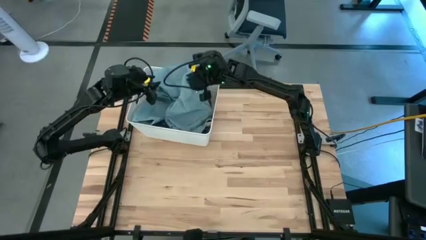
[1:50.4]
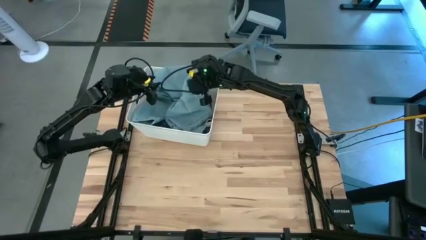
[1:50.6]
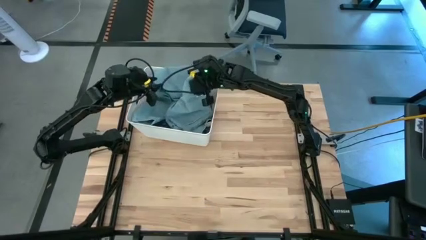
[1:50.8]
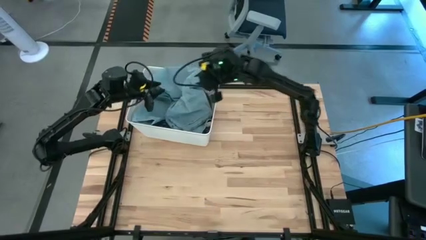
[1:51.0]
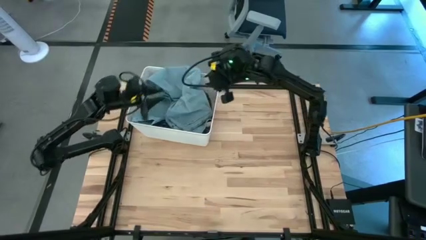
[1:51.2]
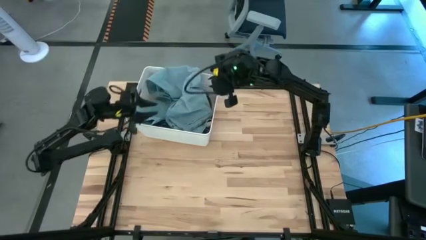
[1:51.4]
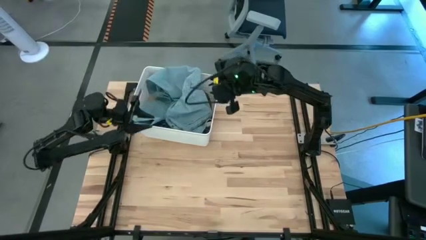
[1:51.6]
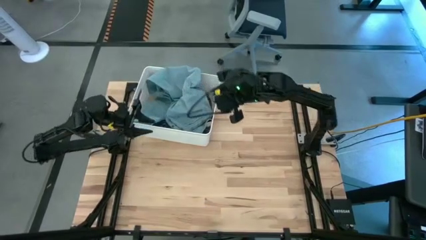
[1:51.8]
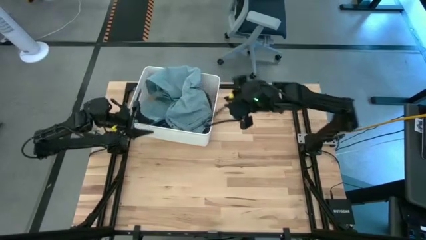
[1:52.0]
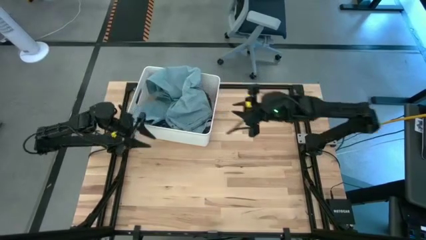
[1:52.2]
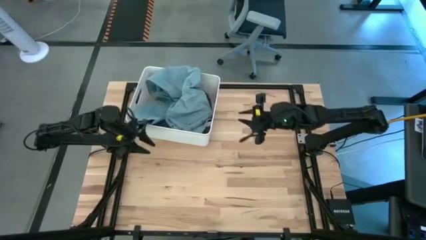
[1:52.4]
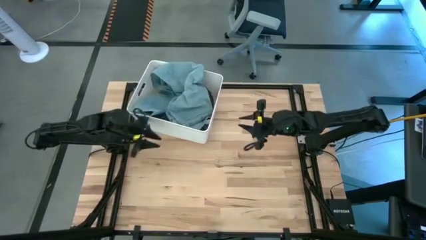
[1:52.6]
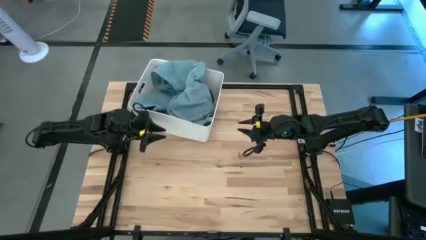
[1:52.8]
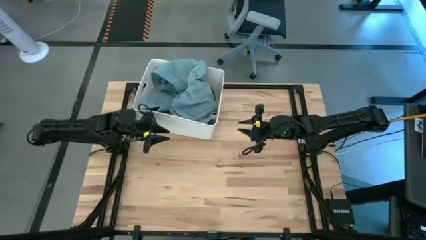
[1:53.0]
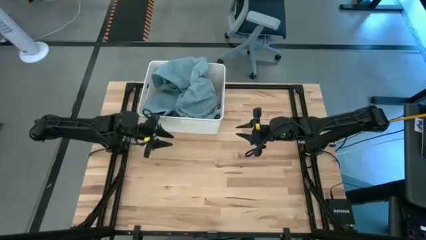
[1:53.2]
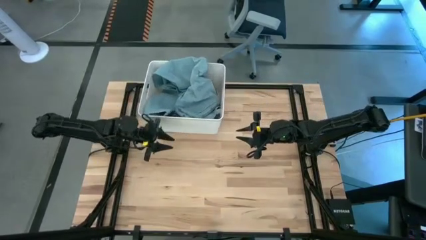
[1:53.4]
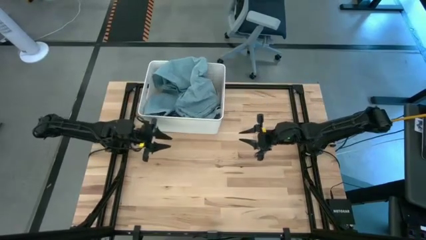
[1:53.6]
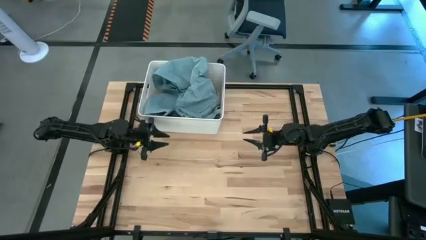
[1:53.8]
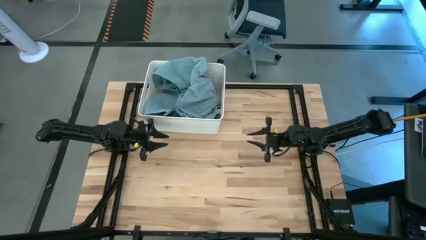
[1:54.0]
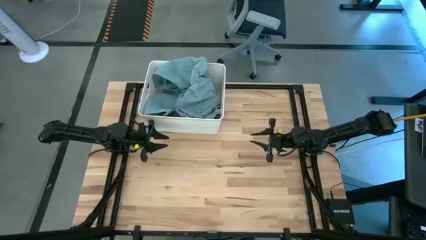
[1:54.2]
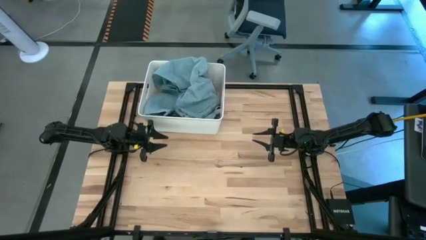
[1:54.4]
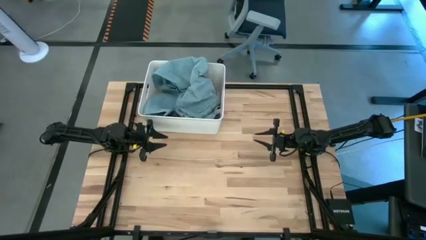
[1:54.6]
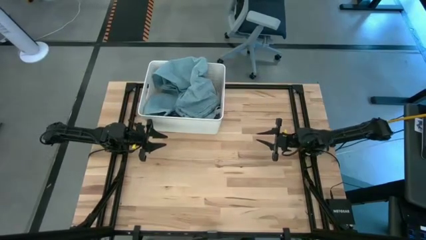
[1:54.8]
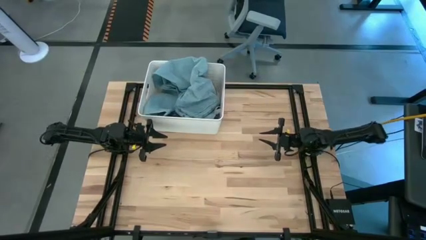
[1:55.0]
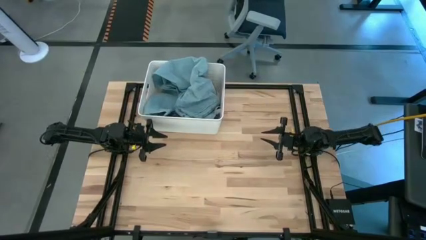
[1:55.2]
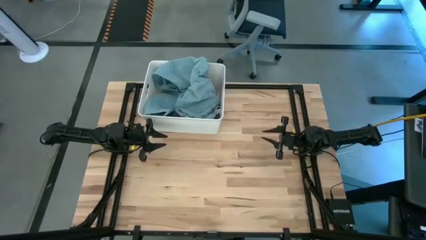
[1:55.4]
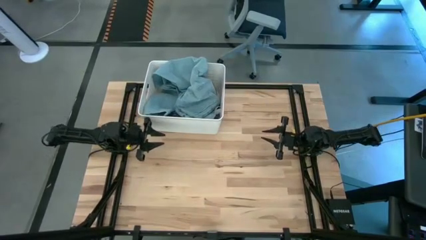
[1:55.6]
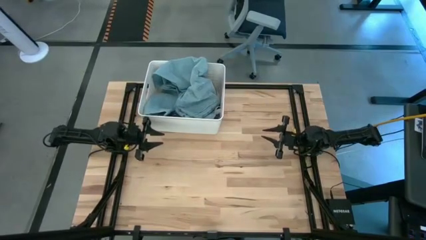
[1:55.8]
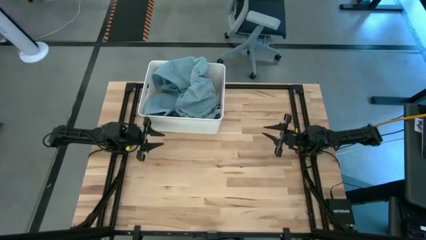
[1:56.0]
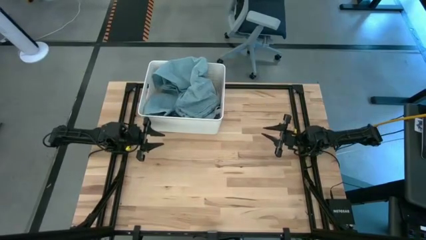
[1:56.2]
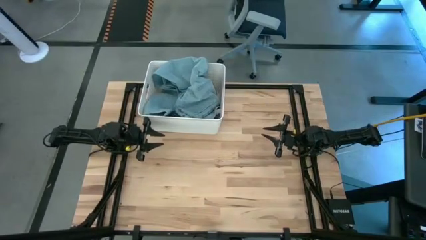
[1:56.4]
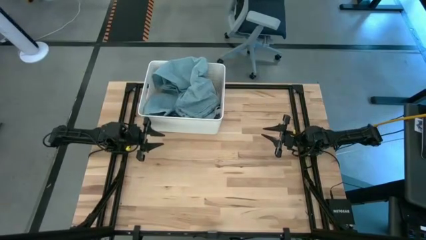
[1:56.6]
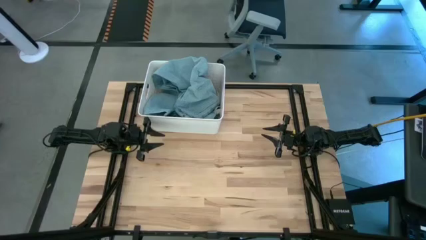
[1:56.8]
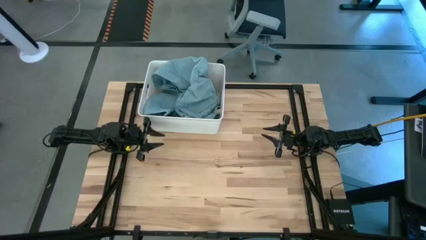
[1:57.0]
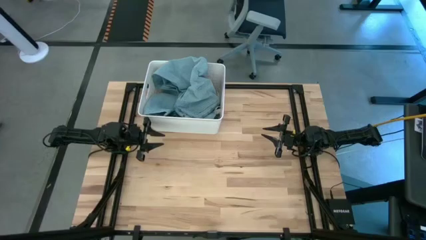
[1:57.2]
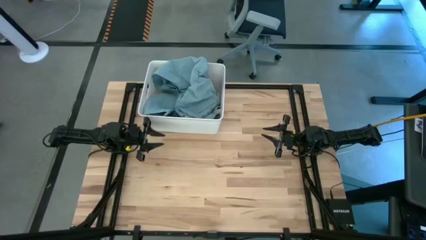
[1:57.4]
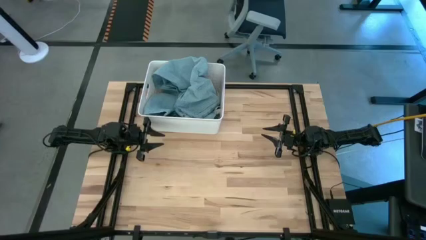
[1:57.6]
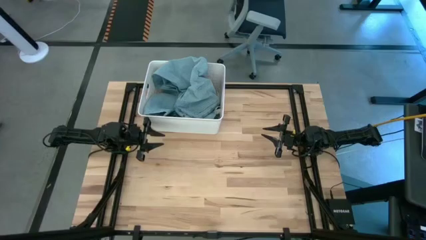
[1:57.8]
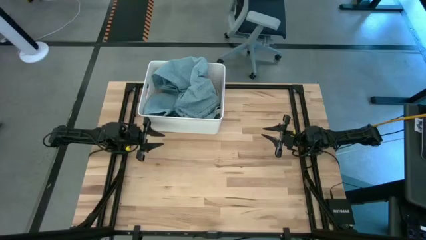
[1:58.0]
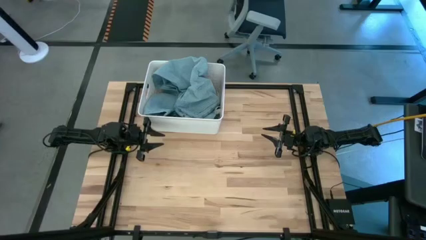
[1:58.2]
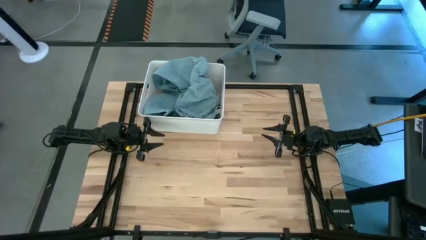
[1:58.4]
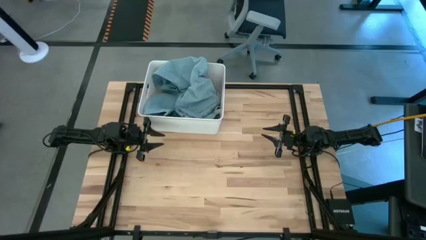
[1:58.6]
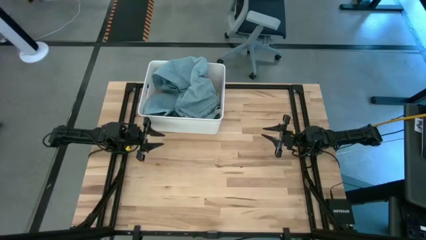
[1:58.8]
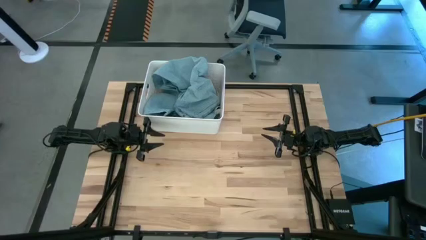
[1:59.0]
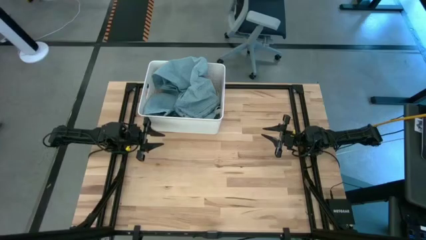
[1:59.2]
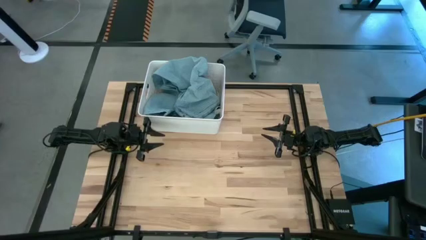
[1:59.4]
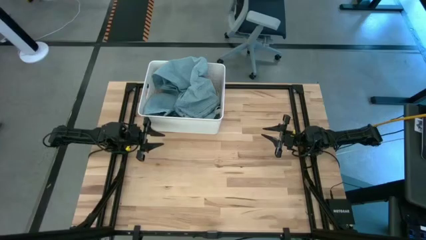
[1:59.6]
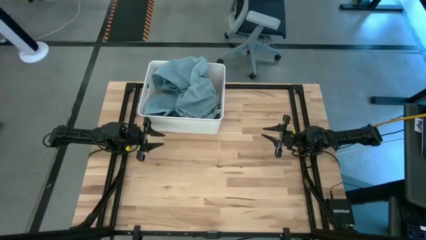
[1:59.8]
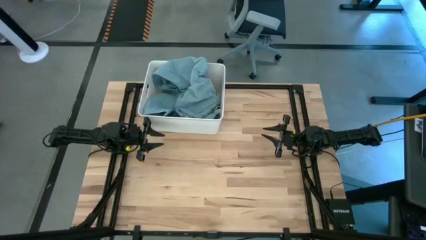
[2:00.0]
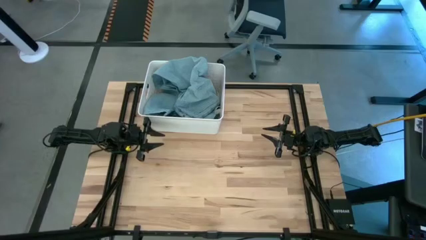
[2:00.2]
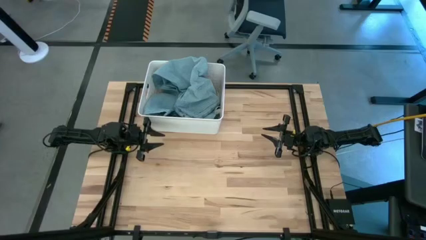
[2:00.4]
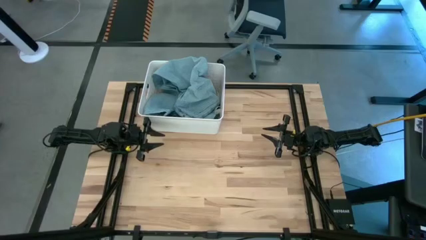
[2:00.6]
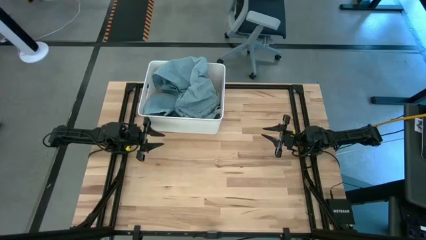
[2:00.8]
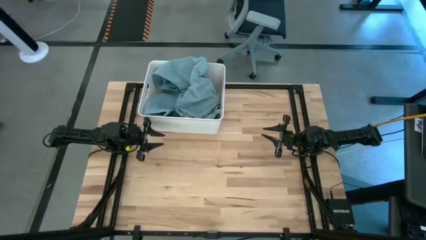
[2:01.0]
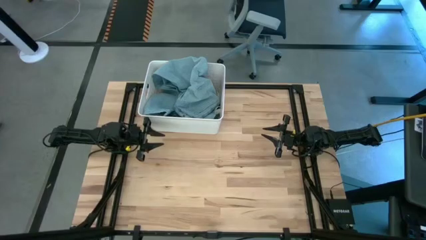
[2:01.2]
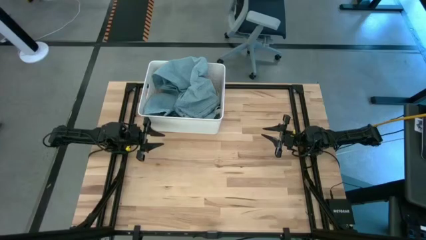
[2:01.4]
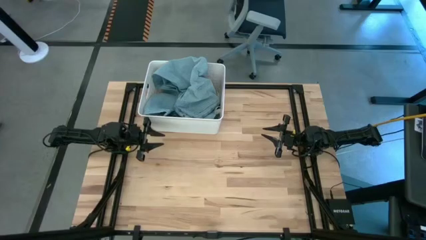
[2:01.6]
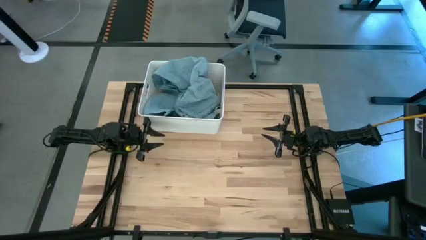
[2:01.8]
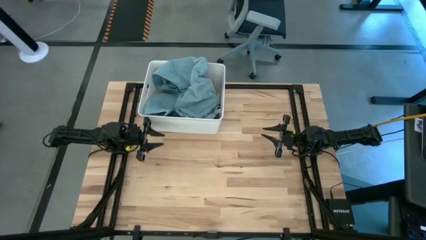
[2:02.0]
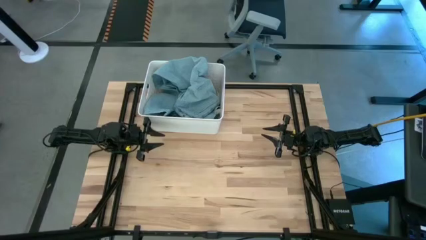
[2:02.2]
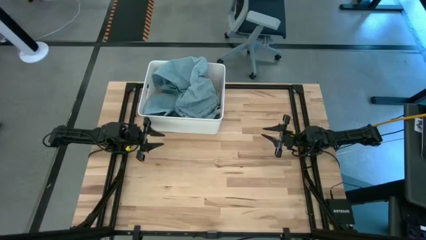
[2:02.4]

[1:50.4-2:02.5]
Task: Sort clothes
Return to Home Position

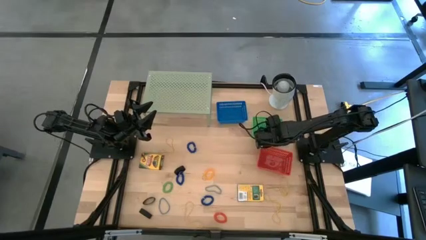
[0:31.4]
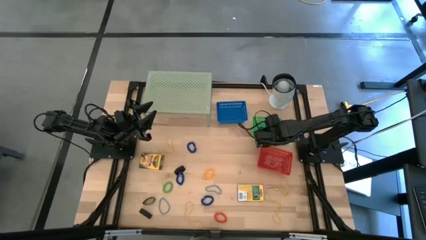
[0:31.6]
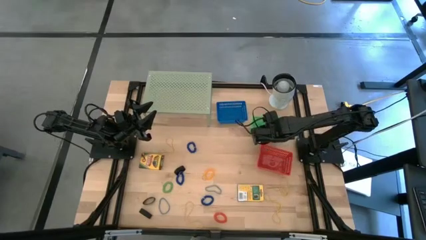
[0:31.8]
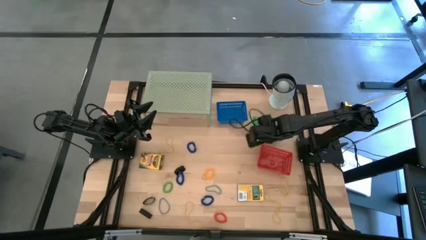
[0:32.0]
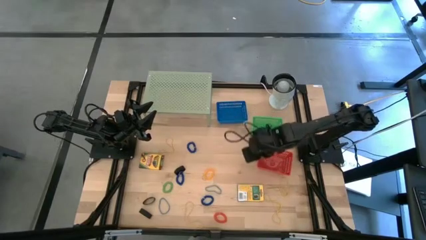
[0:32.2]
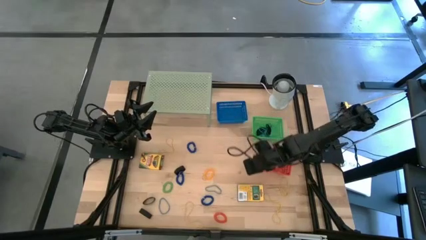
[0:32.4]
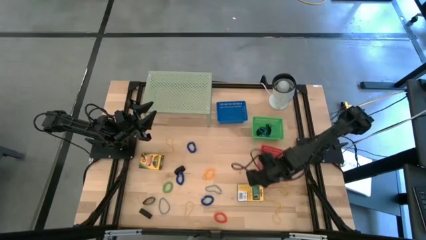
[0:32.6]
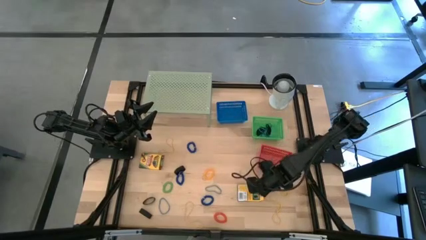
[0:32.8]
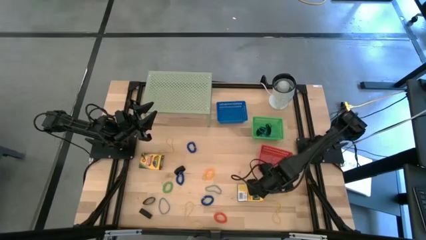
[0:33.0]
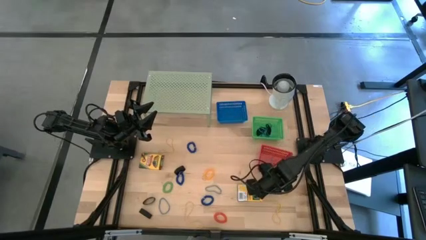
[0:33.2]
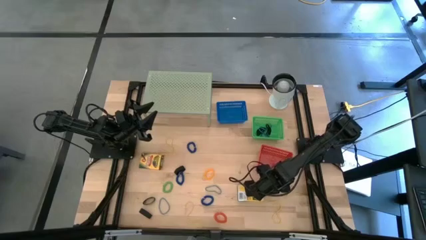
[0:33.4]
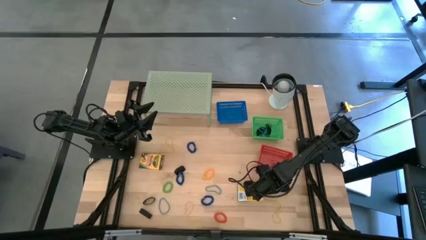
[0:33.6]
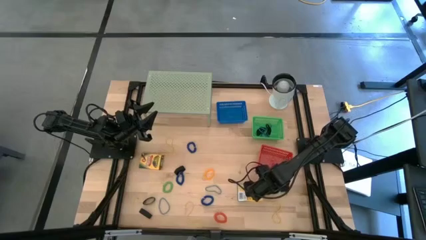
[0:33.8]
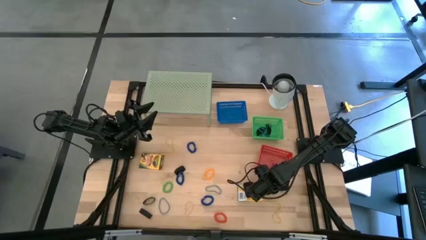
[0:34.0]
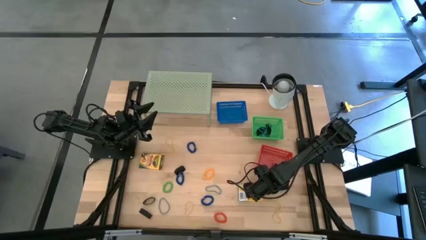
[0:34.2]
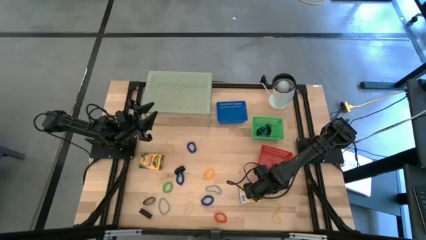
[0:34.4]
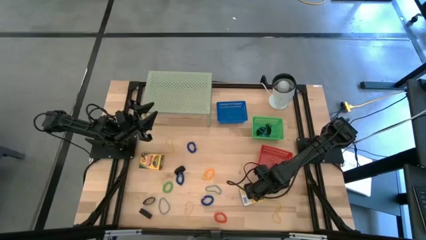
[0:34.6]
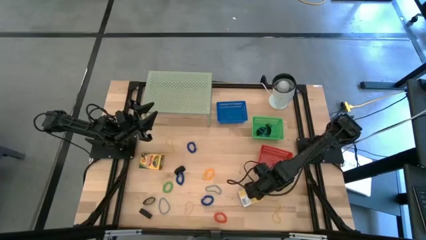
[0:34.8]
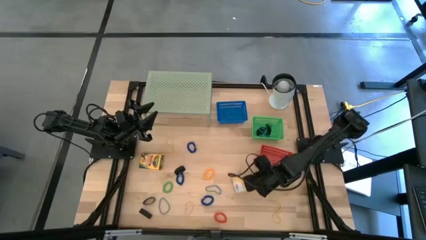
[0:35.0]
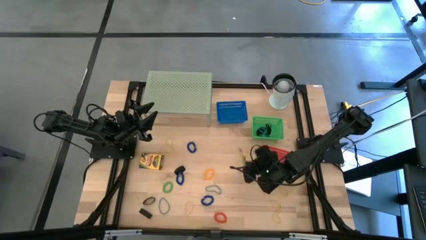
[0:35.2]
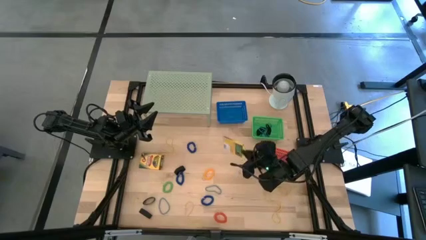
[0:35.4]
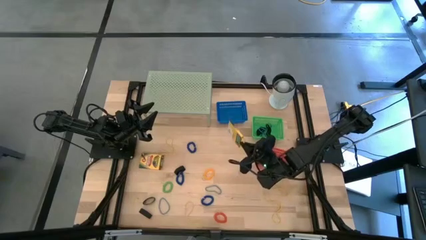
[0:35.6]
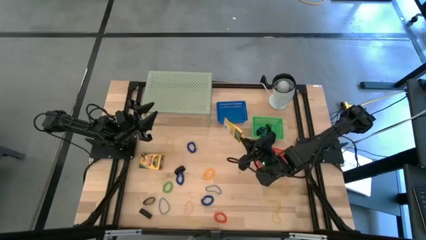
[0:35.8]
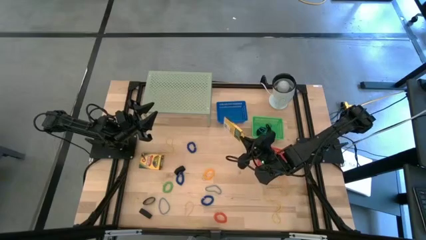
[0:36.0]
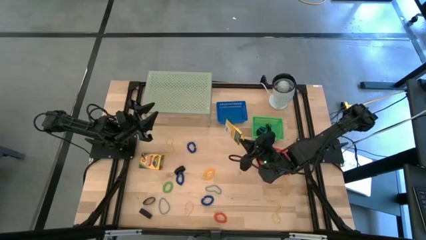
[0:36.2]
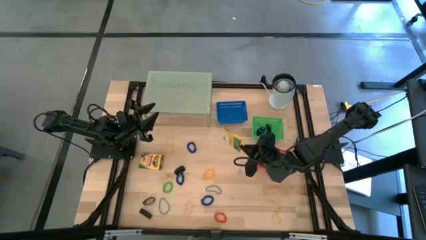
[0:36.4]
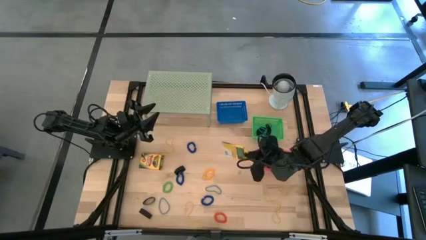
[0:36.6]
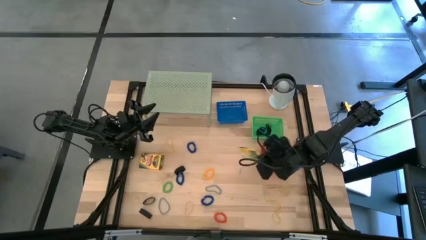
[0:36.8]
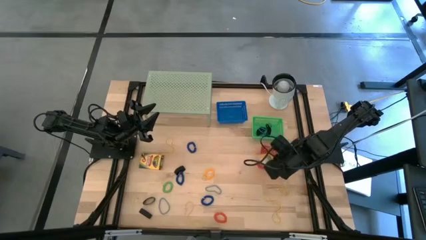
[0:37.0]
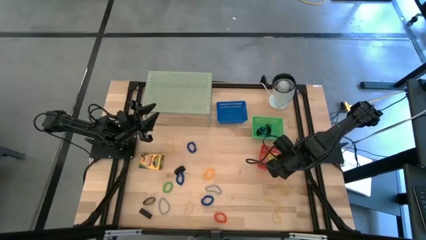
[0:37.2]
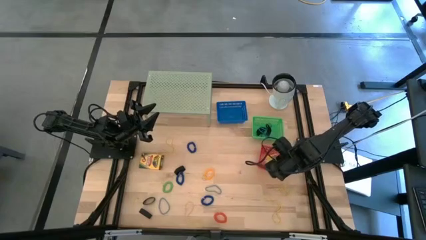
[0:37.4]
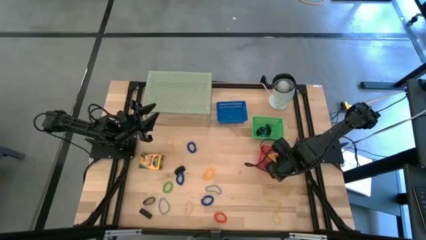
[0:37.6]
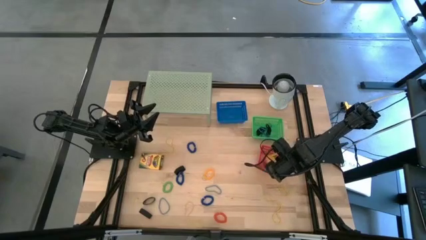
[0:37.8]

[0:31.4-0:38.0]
Task: Pick & Place Office Desk Supplies
Put the crayon box into the red bin
